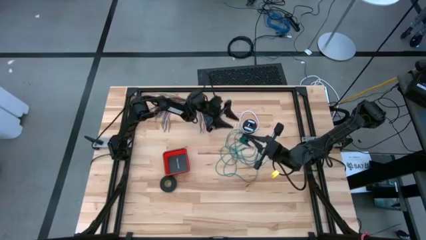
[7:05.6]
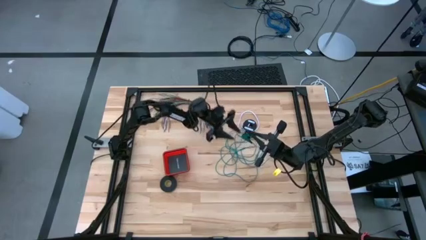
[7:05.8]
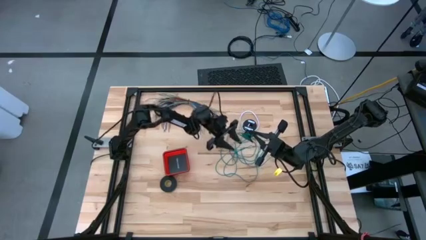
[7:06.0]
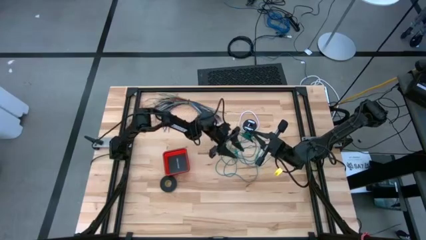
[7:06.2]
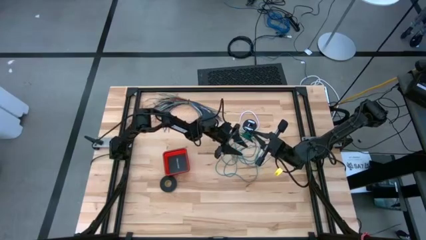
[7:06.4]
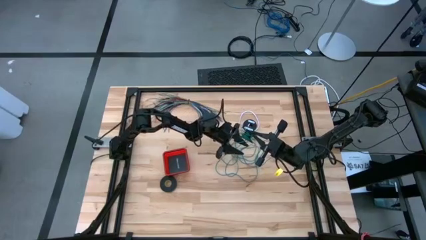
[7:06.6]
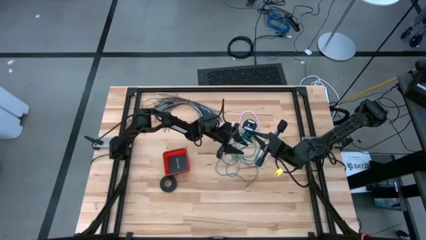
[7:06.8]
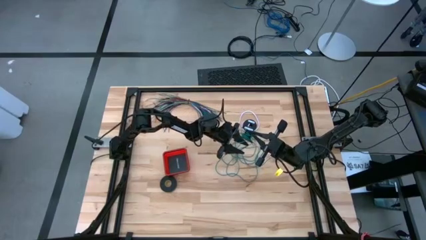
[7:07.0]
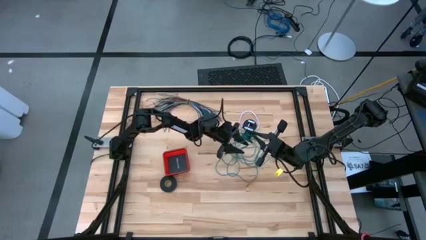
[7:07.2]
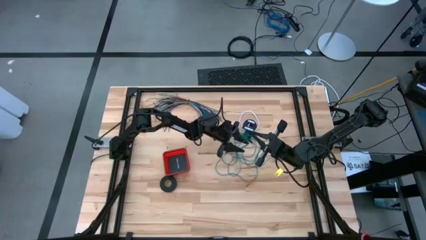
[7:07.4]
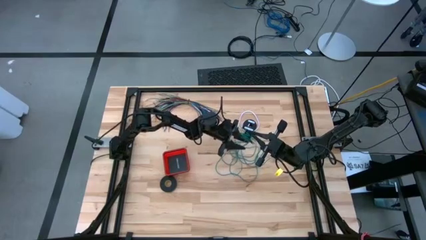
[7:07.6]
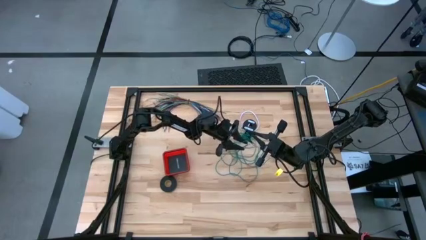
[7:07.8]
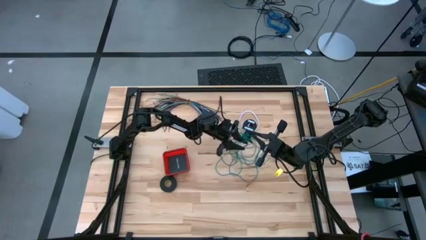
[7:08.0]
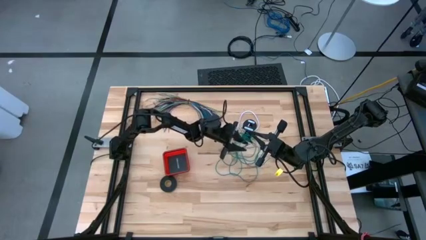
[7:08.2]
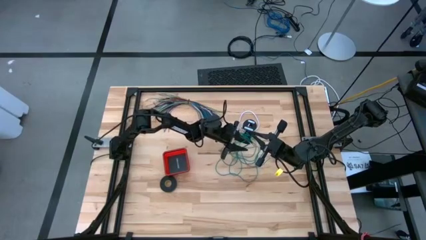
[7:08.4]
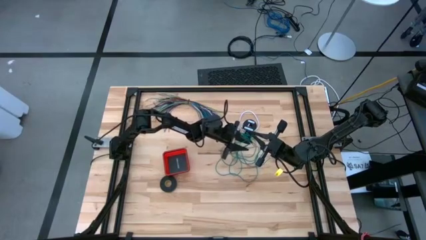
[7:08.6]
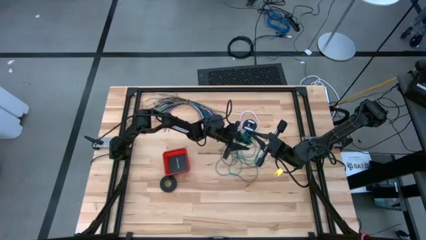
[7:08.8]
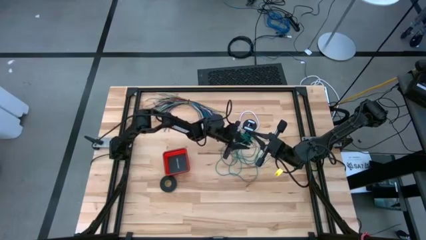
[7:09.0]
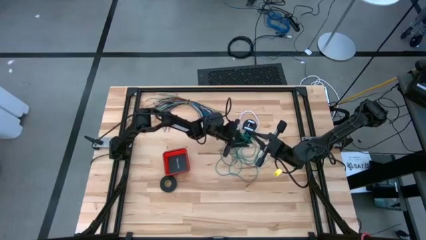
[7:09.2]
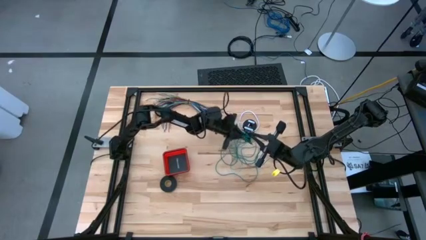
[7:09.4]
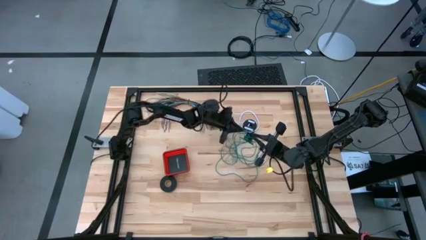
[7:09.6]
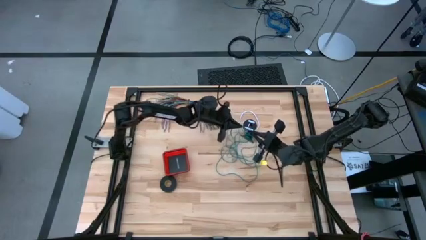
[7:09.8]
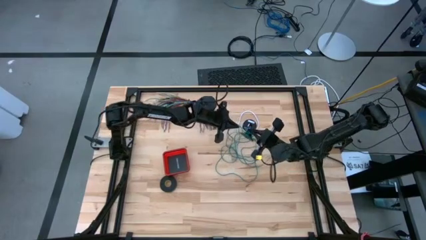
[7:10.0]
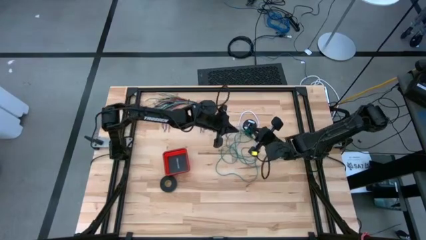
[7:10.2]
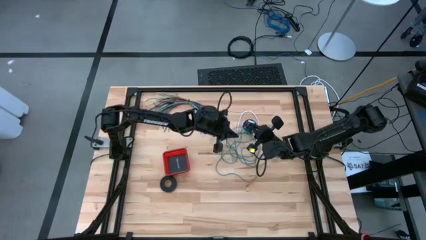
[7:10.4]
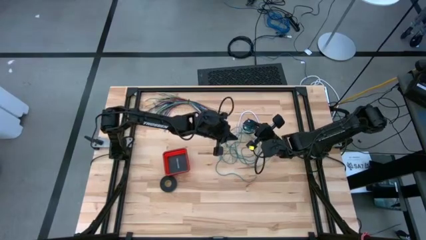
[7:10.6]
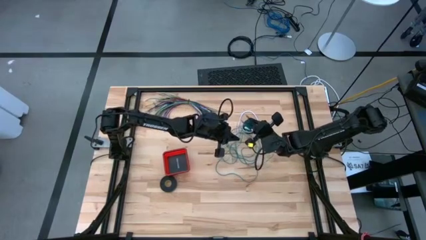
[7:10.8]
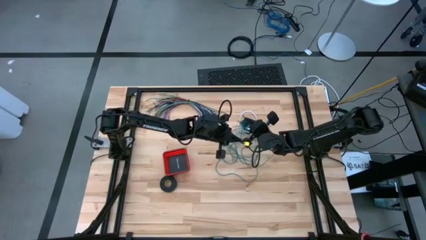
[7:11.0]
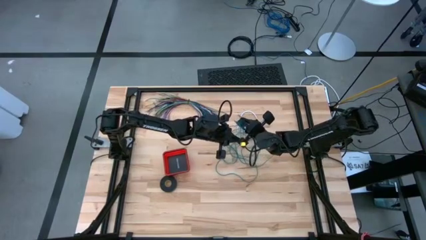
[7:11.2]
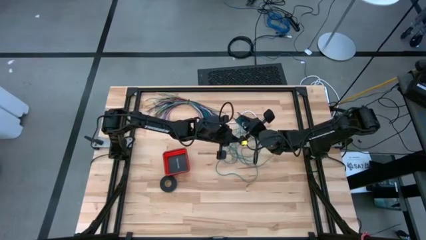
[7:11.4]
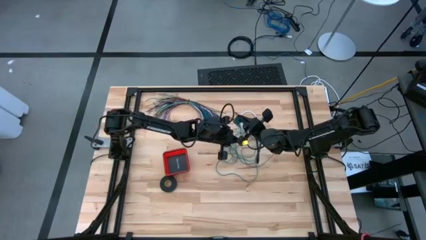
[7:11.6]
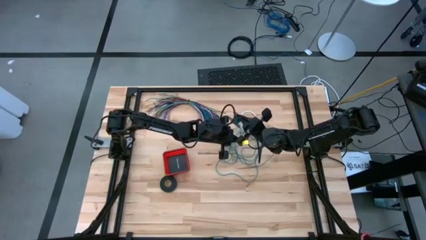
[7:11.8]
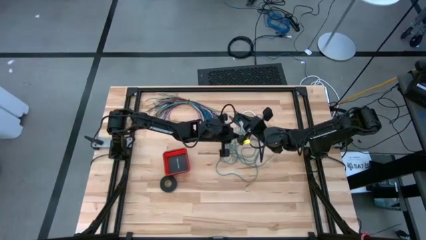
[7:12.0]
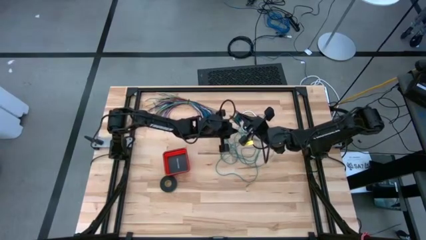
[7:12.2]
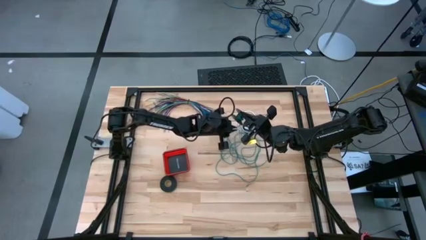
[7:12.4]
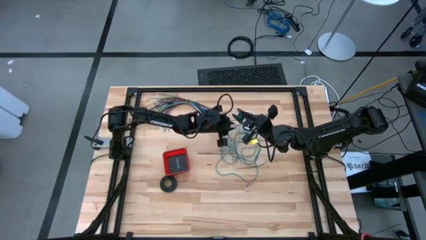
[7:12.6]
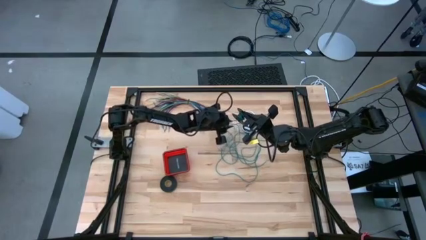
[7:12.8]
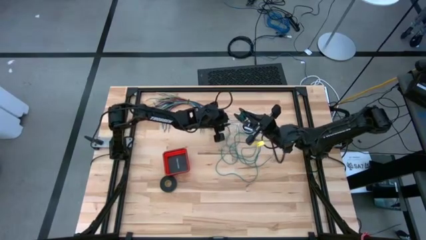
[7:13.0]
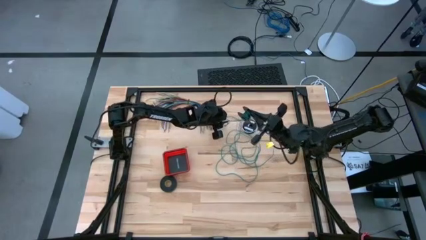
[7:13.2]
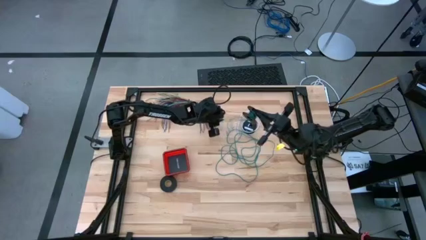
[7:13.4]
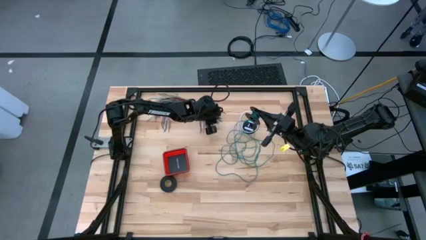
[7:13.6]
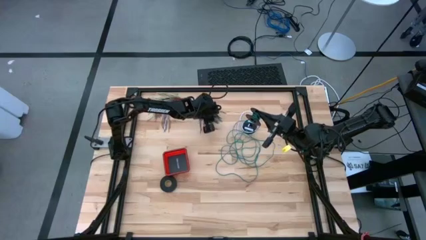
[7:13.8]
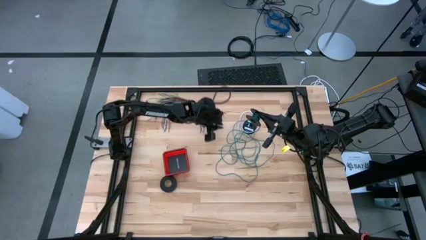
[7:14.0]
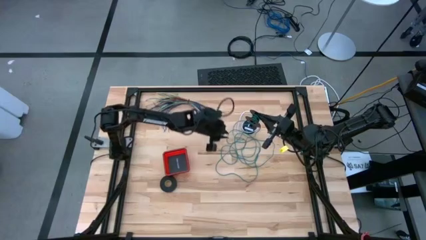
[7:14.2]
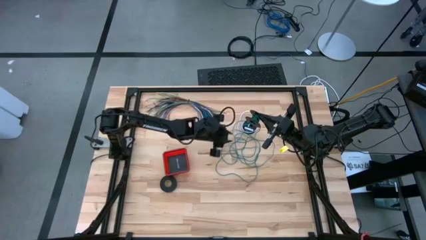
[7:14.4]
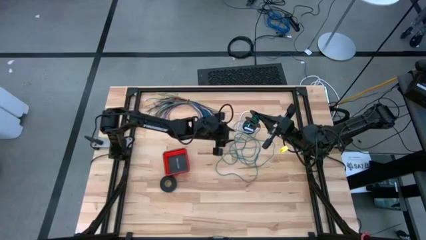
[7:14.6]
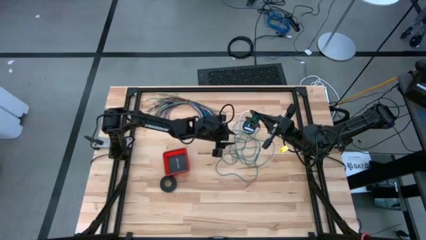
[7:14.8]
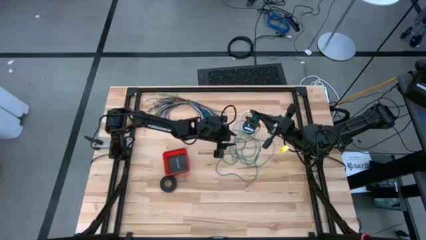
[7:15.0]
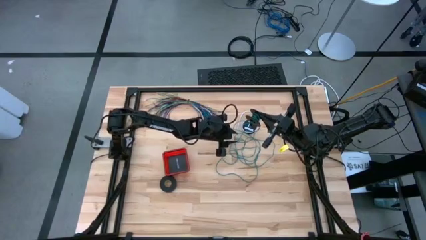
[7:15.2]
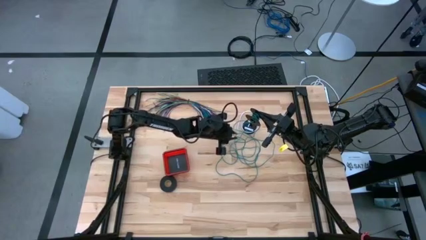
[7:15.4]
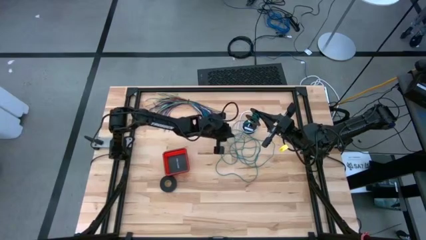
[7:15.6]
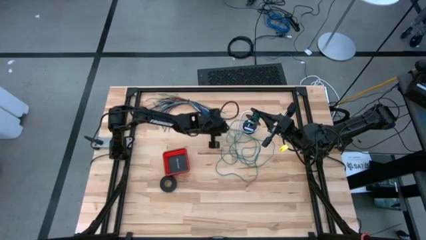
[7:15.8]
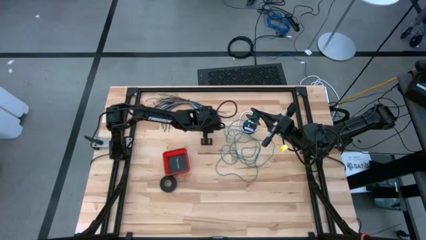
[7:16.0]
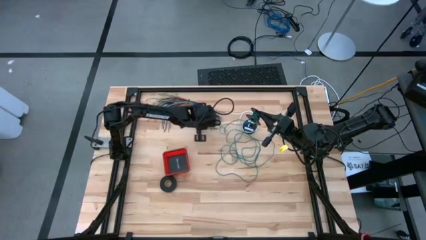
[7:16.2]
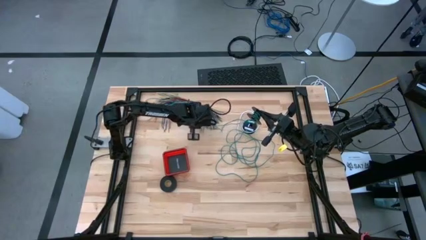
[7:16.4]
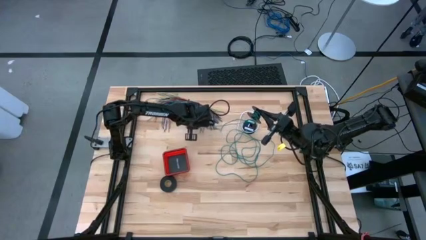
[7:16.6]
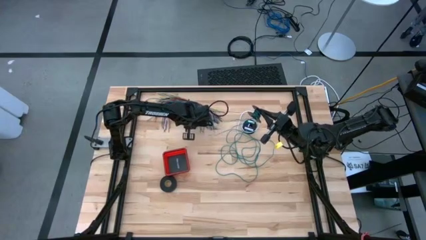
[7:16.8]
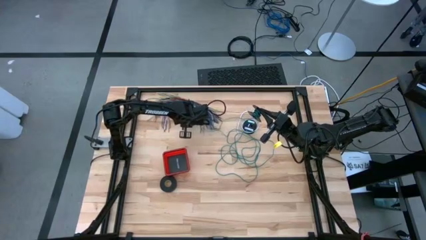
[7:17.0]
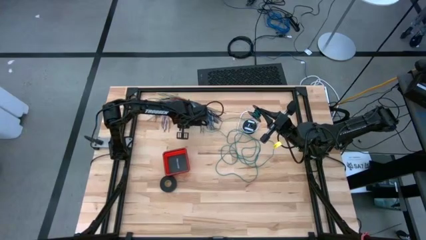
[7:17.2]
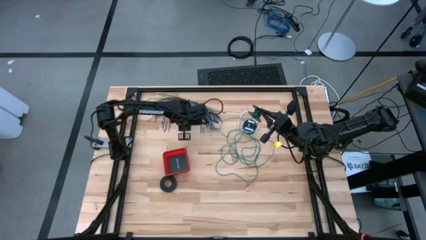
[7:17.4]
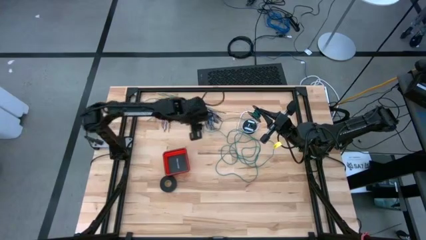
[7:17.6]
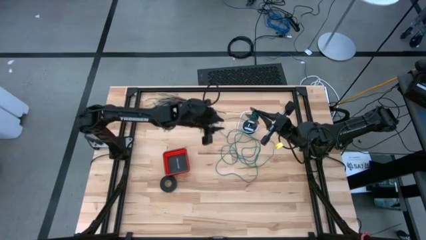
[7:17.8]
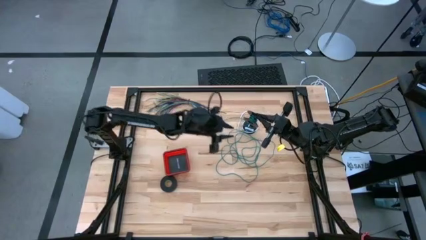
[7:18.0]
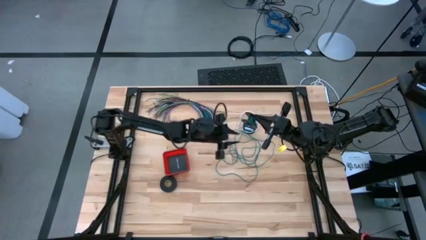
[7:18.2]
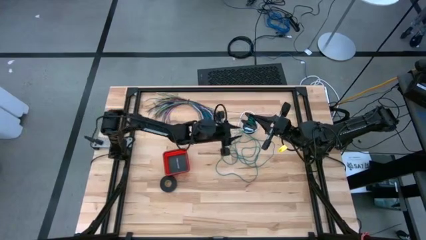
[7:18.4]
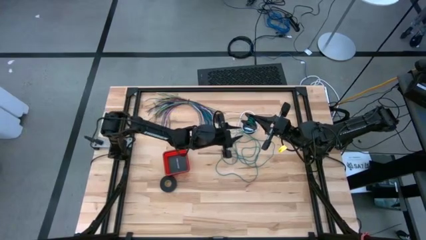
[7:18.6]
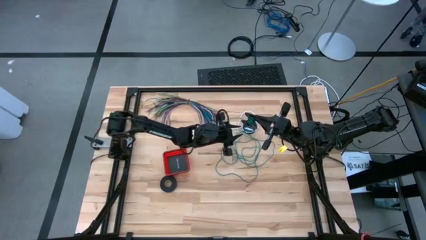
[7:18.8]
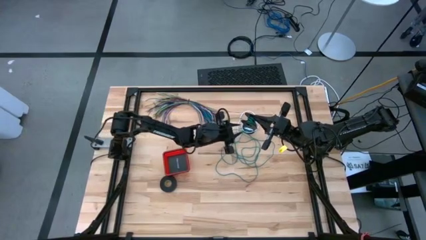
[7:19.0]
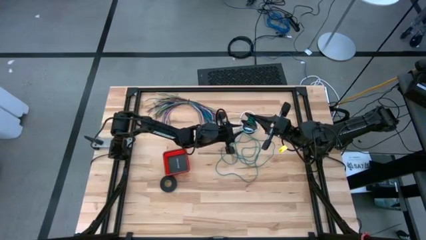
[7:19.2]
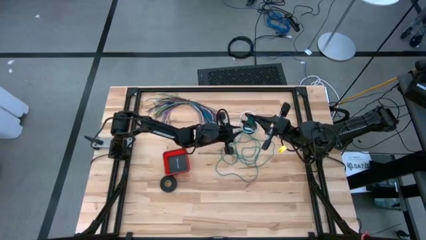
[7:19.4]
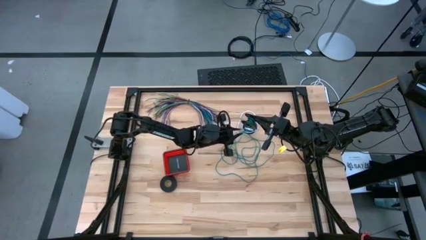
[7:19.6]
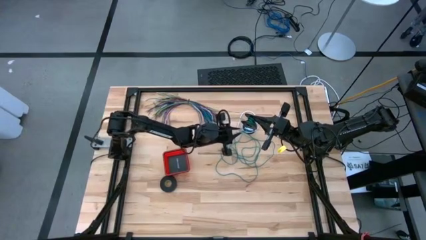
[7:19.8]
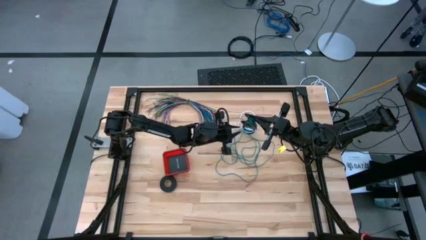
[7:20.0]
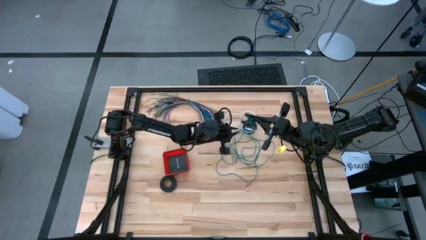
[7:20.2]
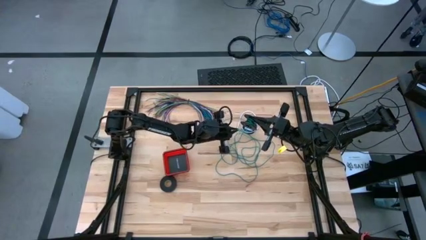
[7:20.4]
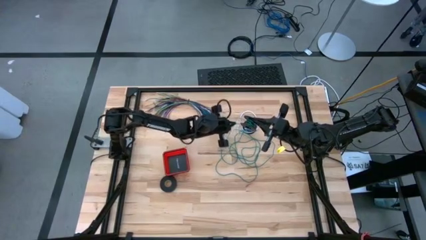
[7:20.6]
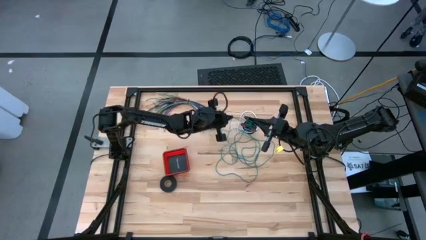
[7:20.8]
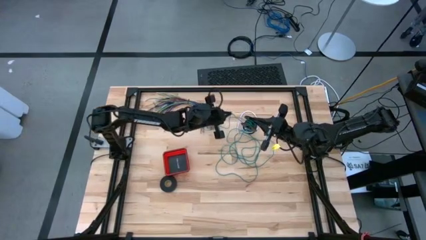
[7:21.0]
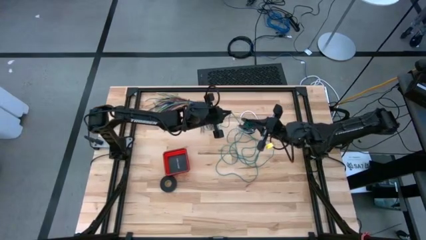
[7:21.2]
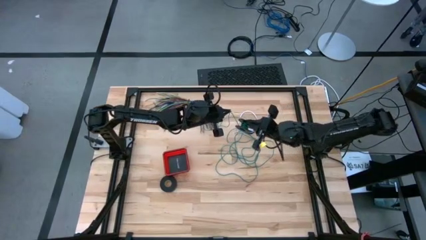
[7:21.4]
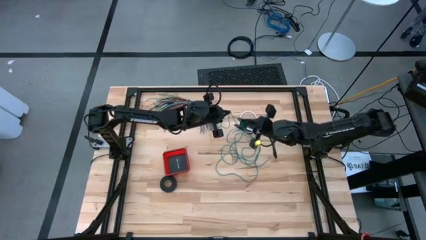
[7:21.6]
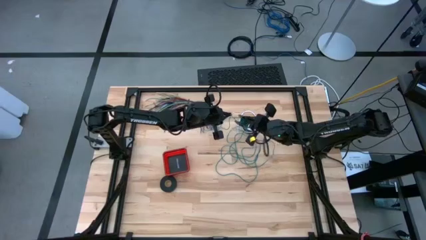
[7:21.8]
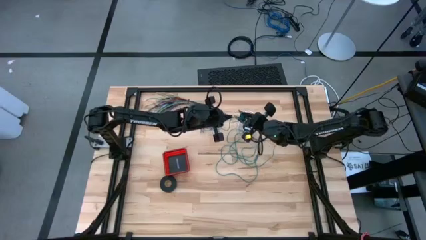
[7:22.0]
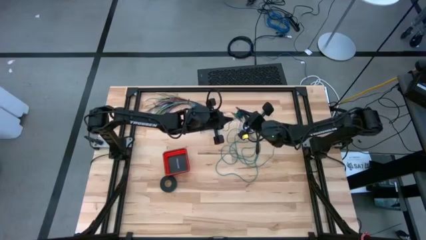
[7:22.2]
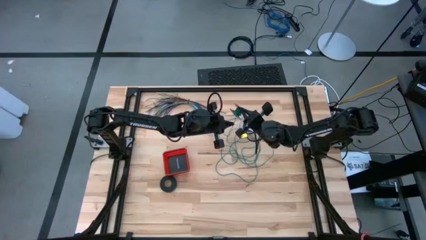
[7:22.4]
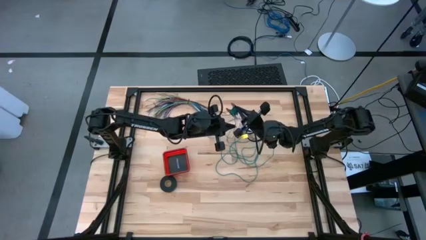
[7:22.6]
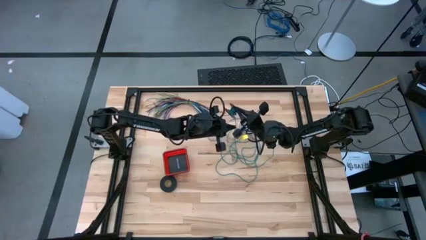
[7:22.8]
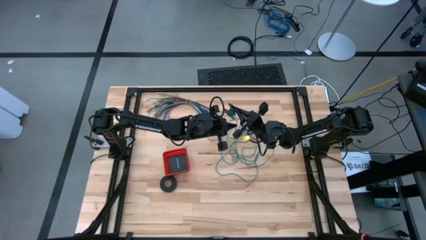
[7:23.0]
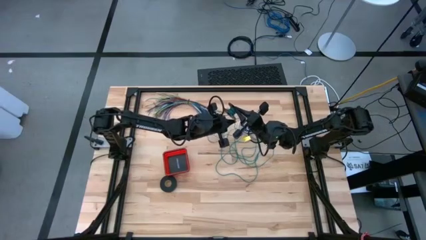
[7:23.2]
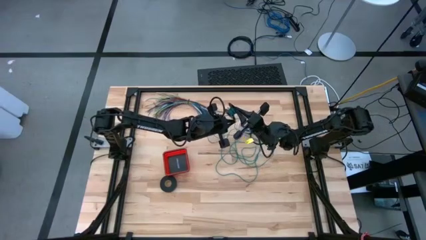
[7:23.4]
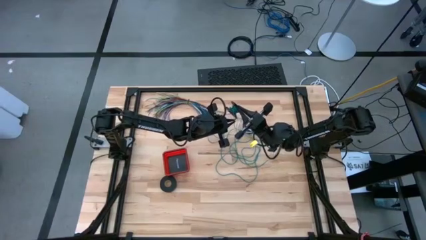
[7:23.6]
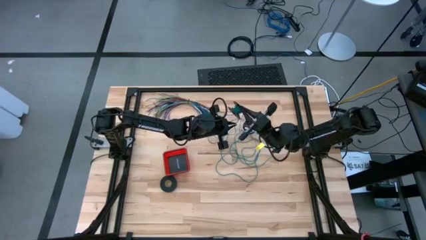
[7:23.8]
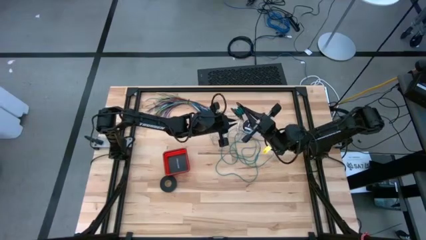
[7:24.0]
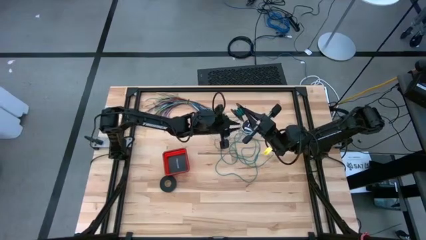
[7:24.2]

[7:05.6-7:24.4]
Task: Coil cords
Coil the green wire onto the spool
